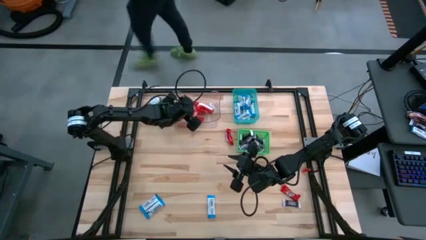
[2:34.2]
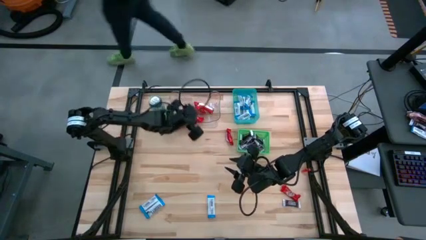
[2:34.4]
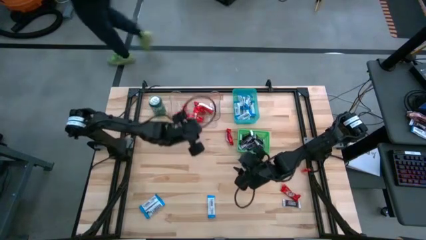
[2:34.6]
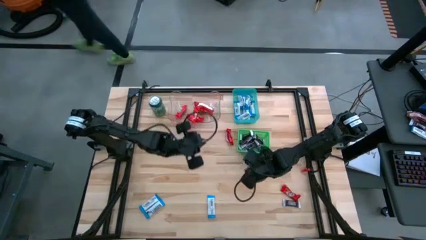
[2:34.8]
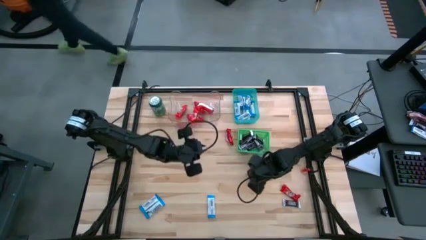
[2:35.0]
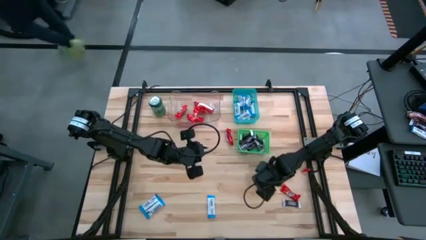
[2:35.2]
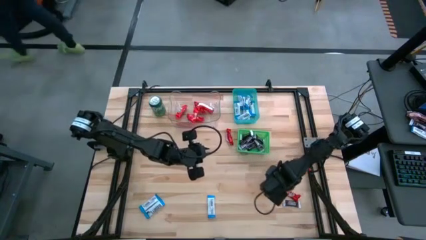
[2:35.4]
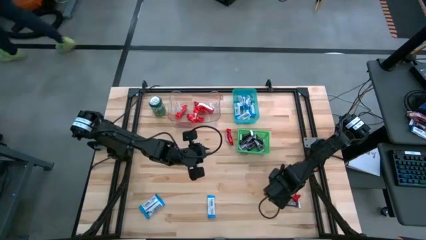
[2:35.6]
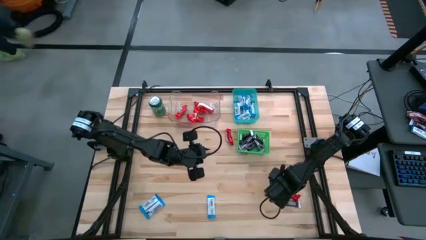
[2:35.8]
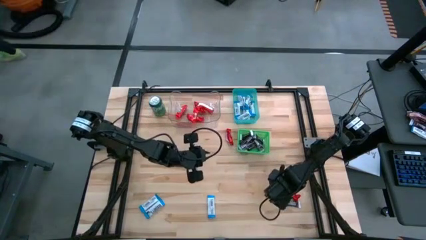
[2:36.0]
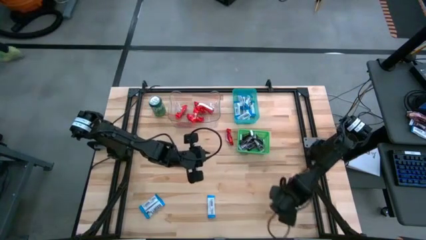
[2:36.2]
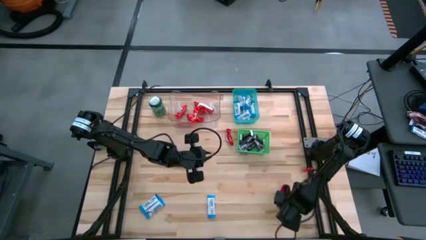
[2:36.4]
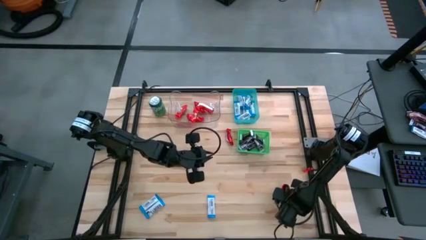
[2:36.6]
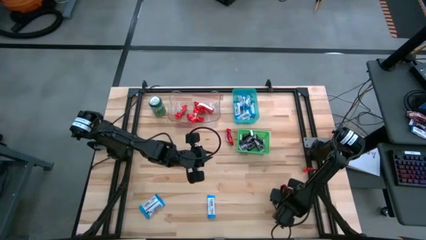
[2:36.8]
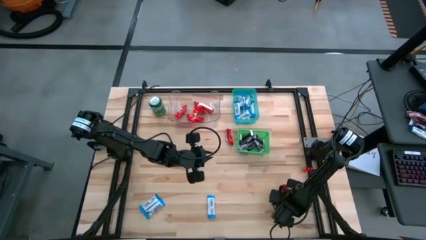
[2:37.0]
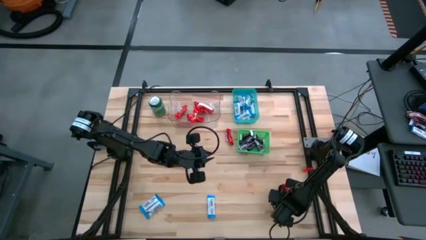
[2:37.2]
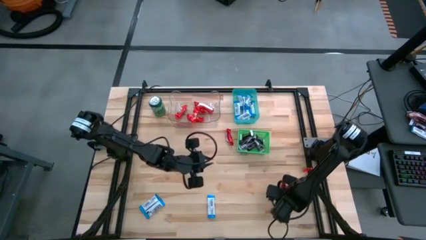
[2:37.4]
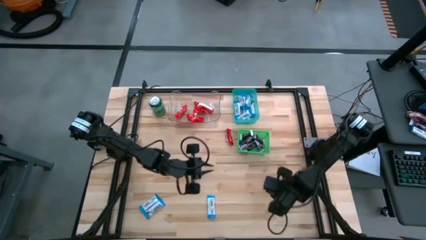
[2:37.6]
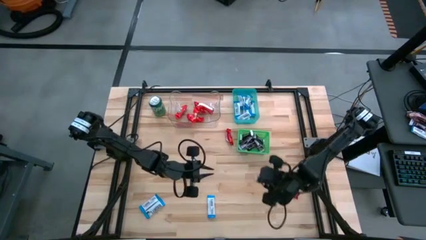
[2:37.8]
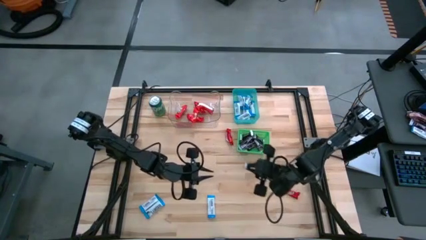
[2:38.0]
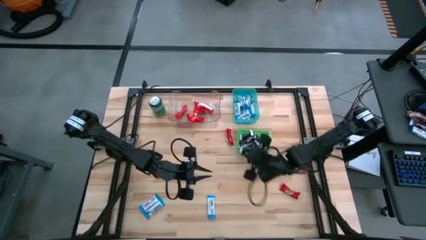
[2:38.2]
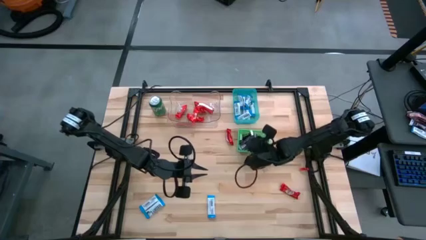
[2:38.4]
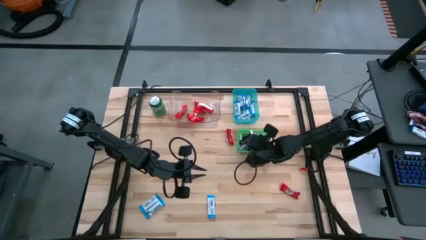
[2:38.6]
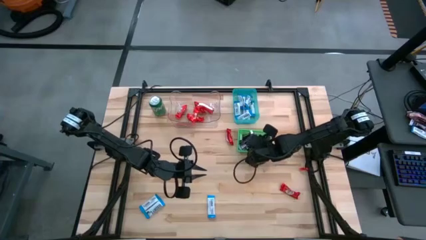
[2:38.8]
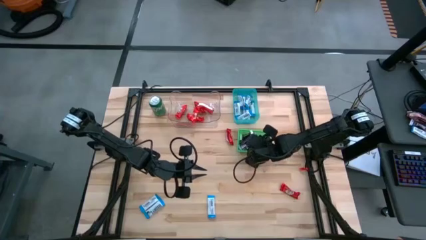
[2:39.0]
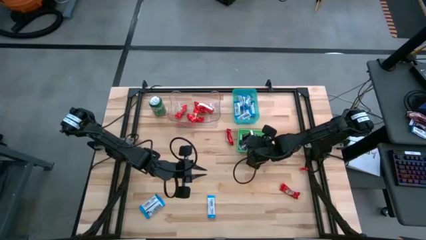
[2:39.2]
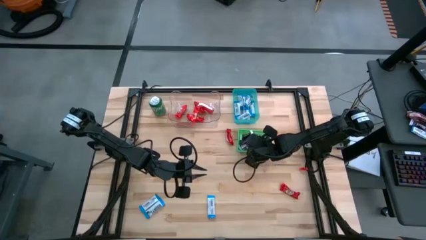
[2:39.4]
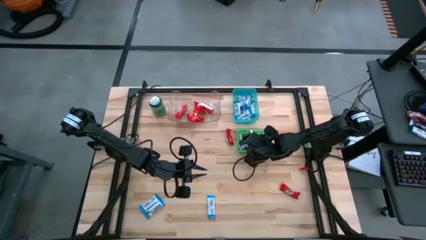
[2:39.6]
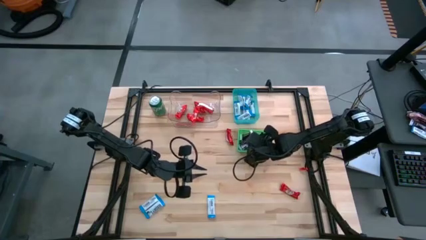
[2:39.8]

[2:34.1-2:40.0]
Task: Sort candy
Put the brown chocolate bar into the green bin

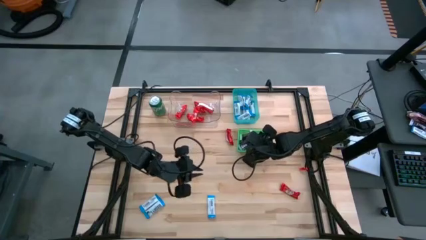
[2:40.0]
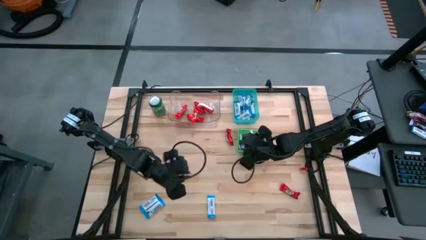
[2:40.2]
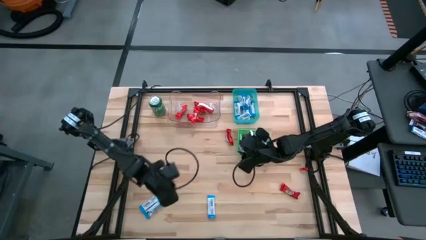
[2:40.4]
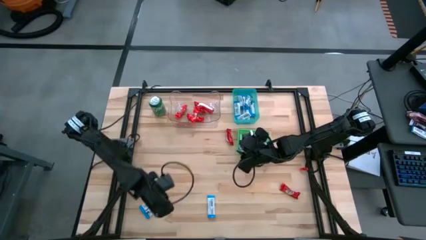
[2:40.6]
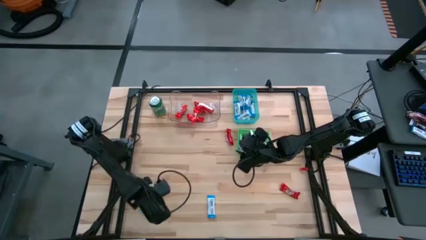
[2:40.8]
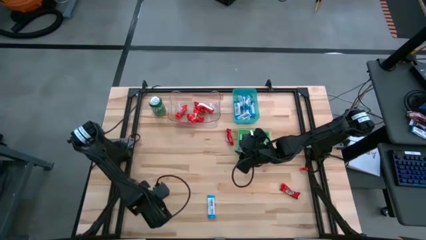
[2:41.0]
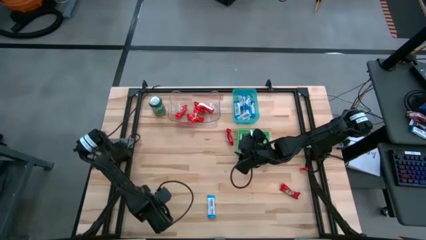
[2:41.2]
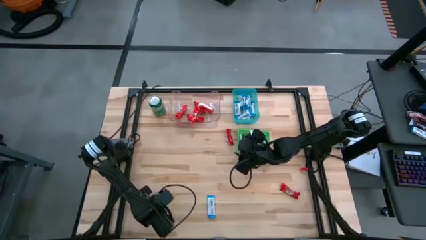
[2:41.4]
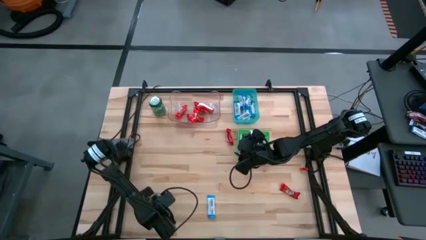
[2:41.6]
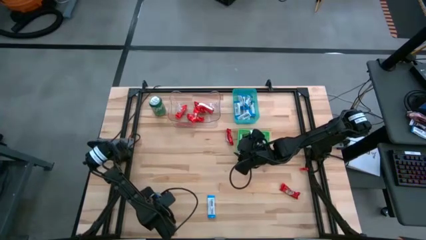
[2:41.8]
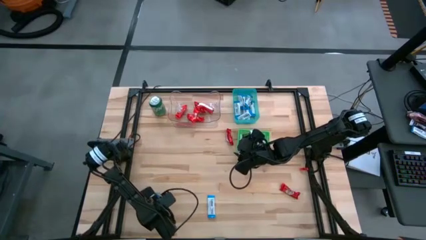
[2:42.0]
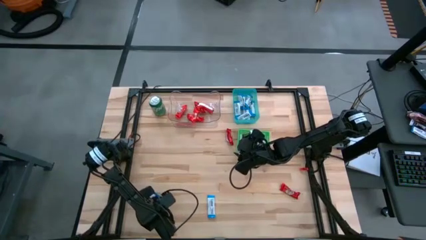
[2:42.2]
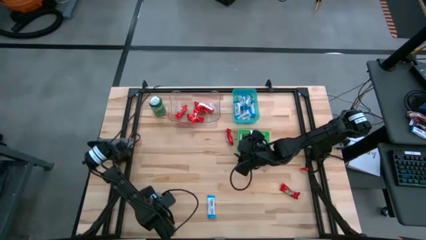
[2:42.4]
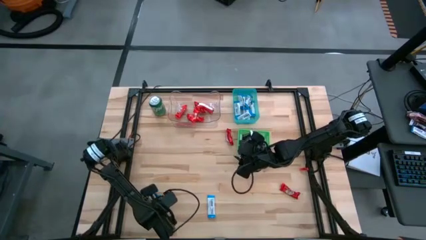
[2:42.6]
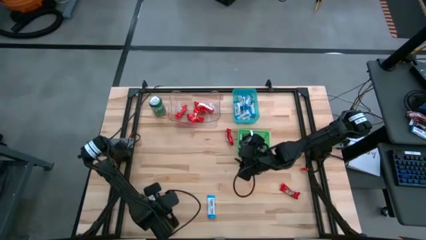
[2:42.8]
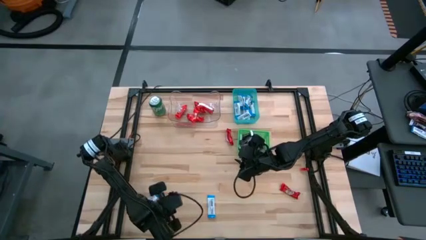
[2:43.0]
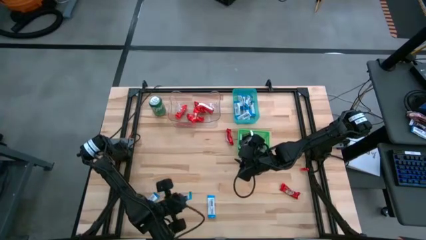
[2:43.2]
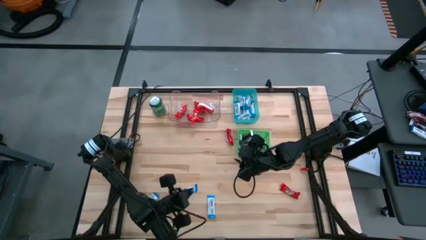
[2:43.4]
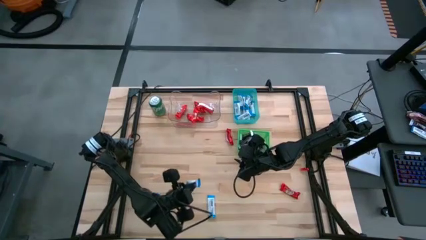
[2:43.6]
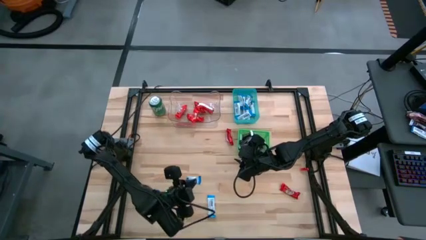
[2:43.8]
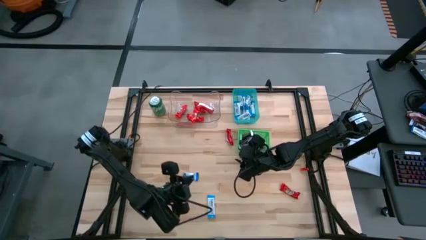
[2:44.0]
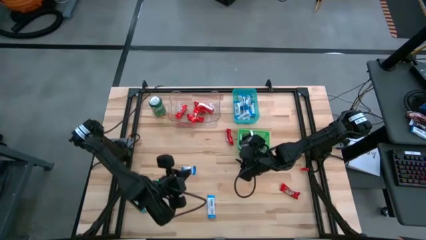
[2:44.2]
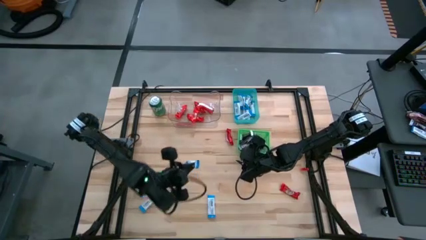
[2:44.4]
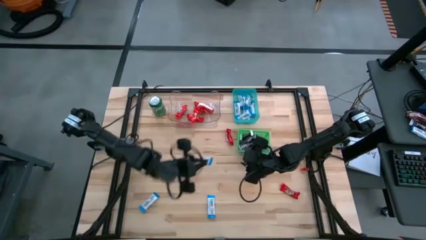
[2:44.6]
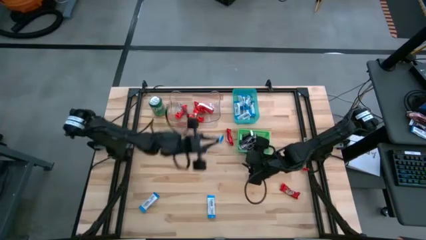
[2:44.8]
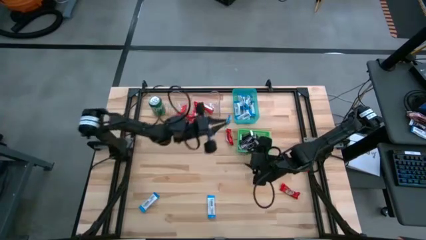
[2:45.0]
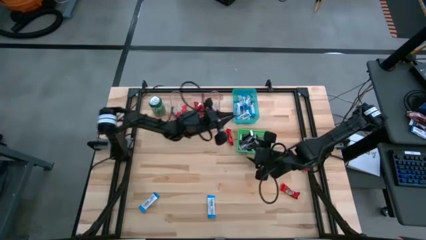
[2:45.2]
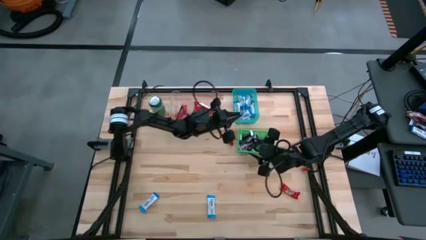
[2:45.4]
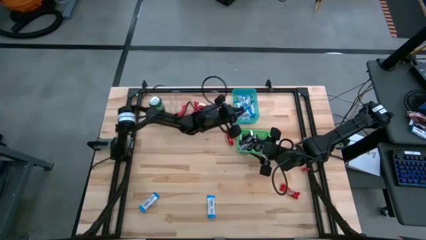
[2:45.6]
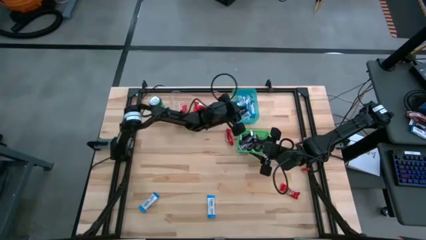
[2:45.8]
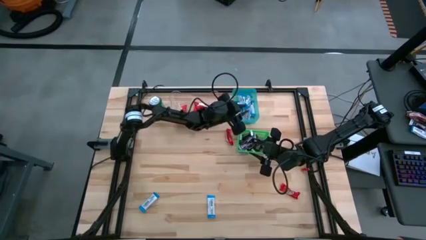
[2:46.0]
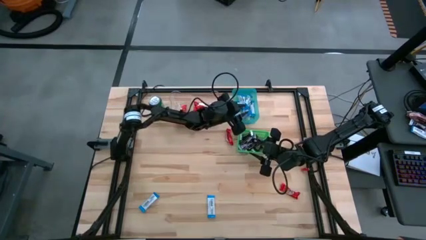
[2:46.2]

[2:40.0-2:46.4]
Put the white chocolate bar into the blue bin

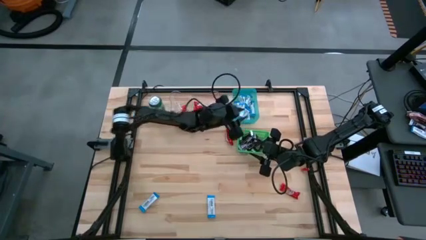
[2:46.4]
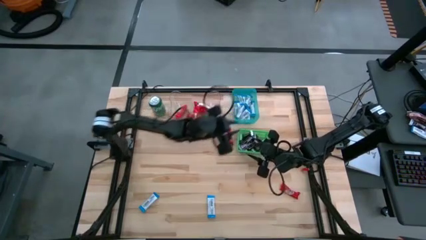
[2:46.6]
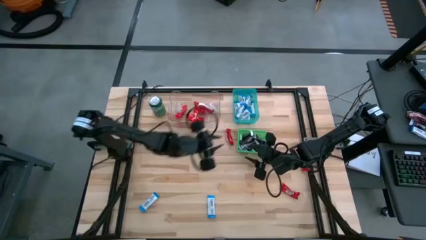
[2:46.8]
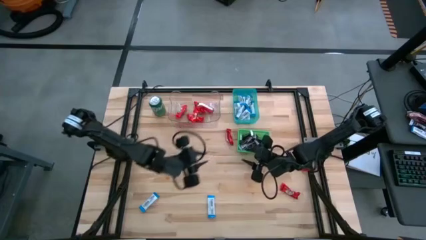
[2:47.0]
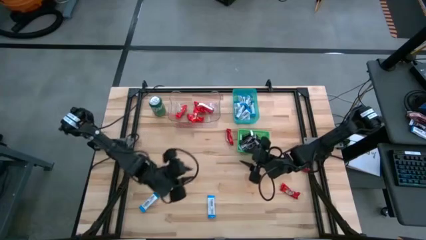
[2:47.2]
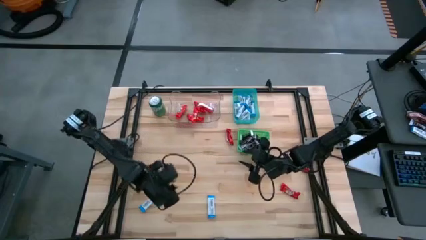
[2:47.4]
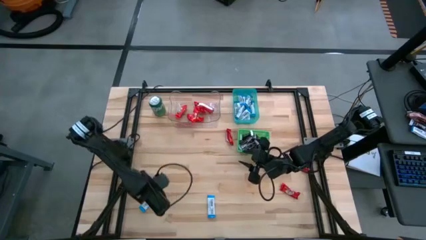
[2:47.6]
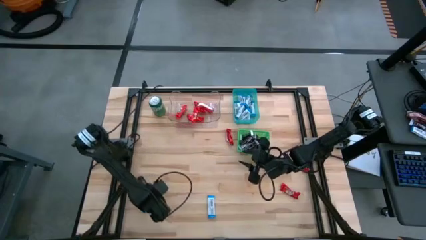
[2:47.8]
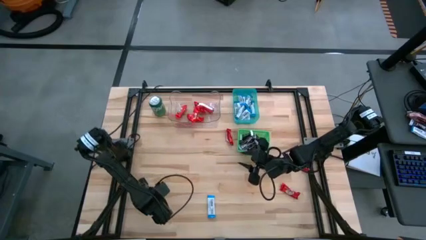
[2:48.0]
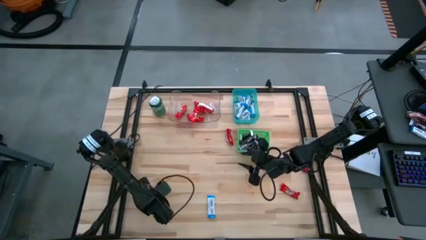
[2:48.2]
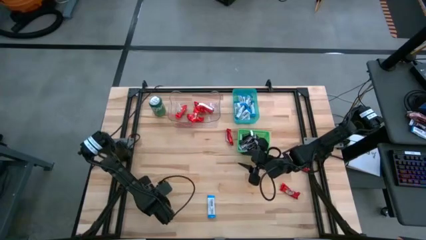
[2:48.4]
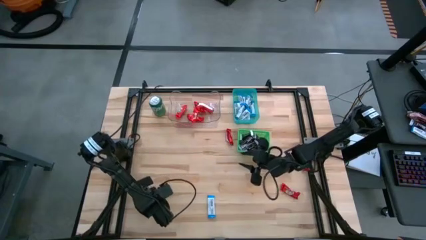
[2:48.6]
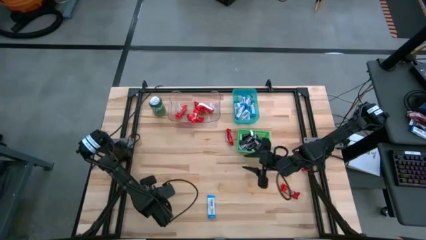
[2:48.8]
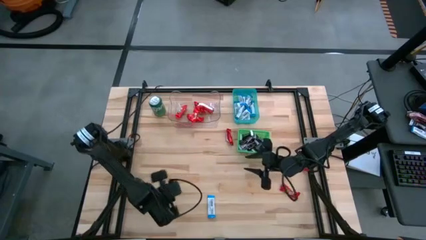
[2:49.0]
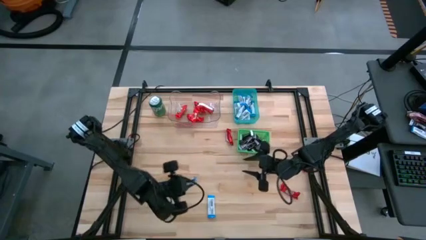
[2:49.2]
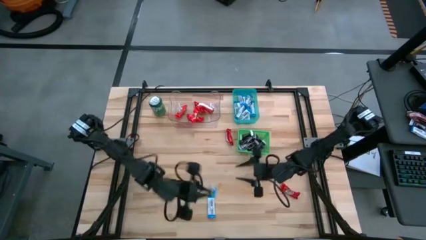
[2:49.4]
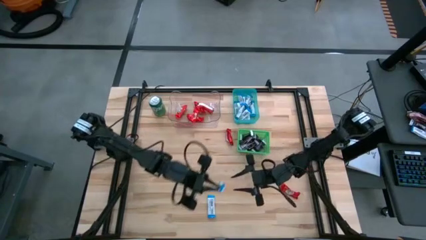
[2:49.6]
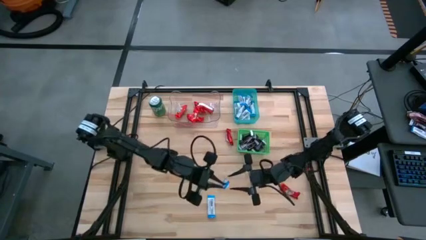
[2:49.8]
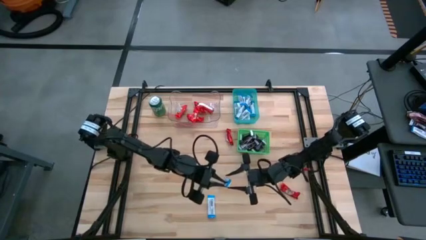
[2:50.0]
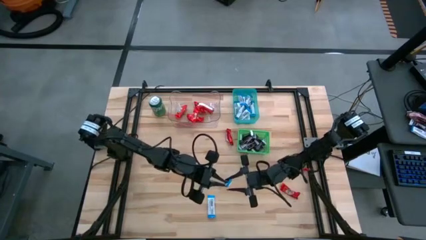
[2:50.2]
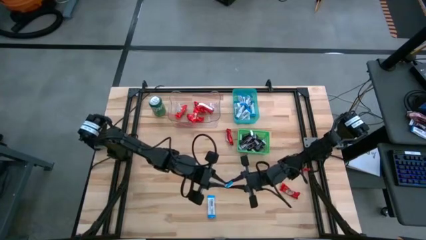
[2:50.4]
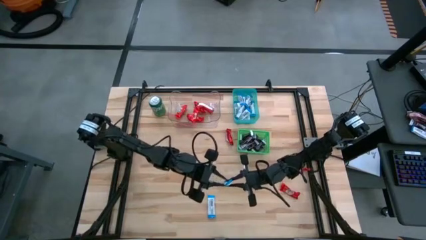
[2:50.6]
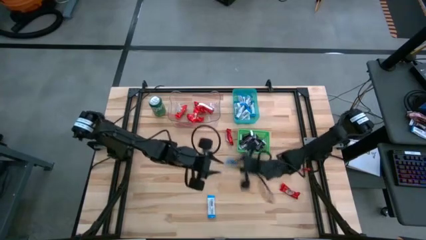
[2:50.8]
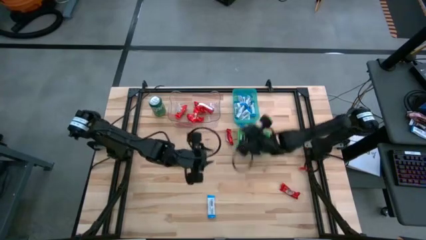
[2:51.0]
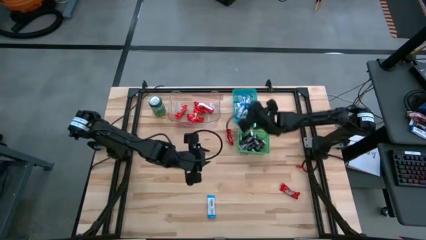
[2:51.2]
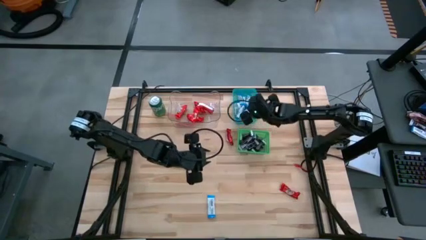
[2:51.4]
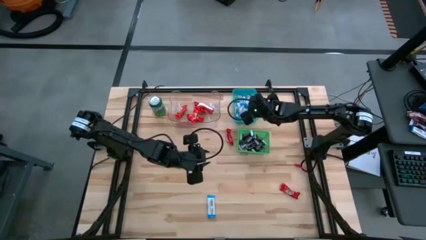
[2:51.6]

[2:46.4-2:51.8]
Put the white chocolate bar into the blue bin
